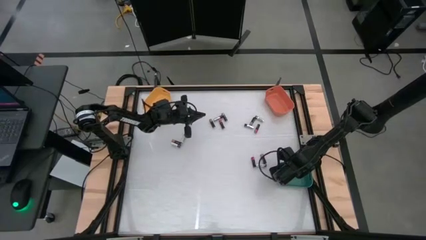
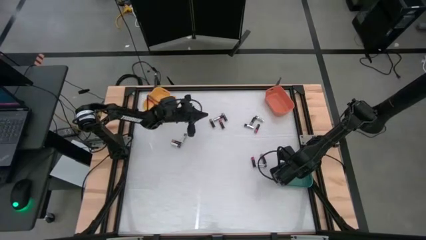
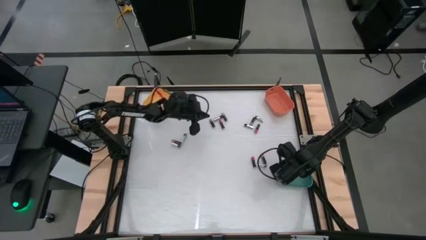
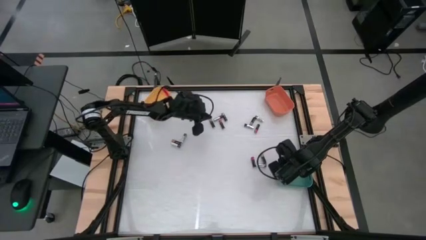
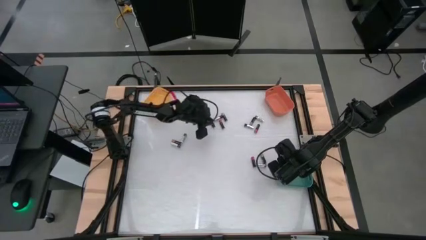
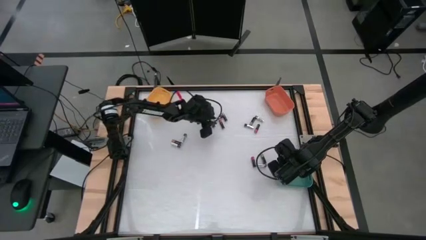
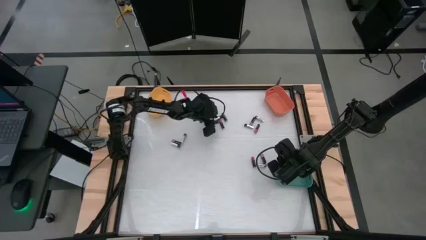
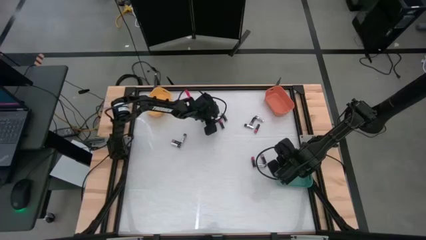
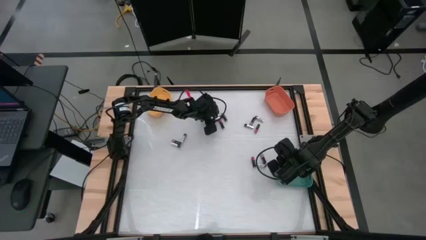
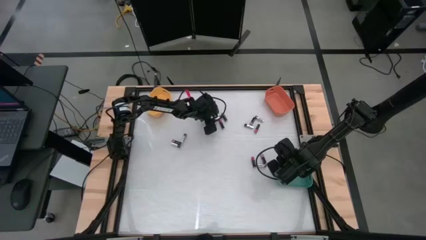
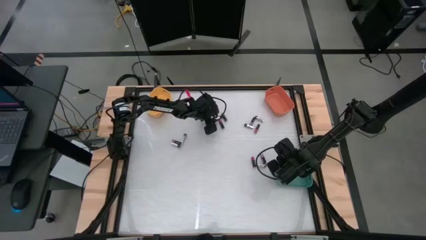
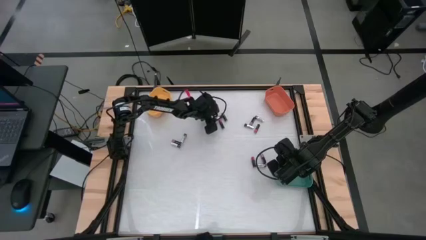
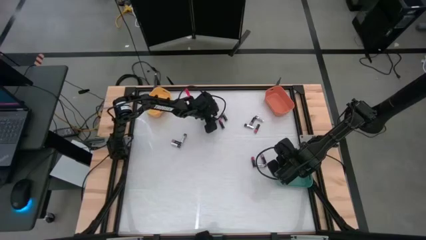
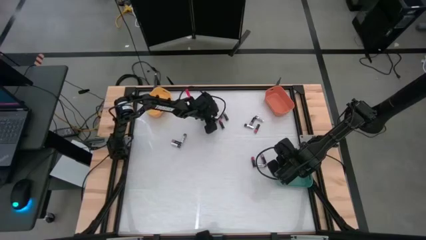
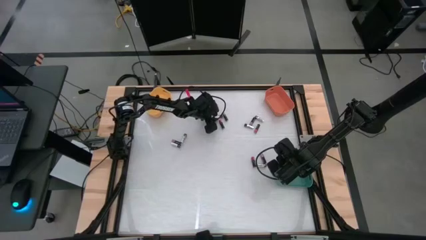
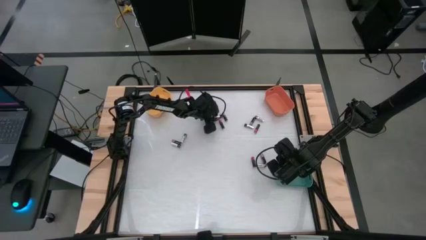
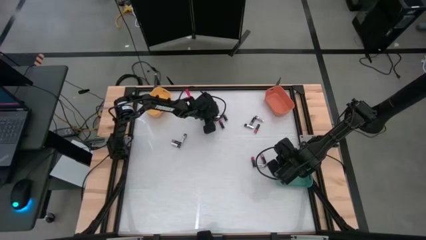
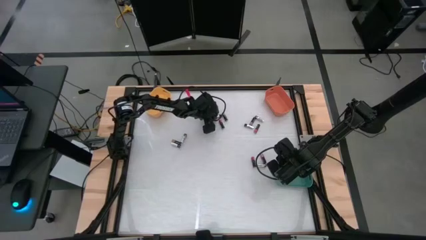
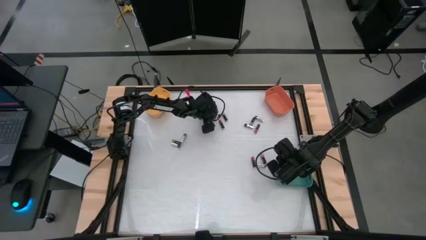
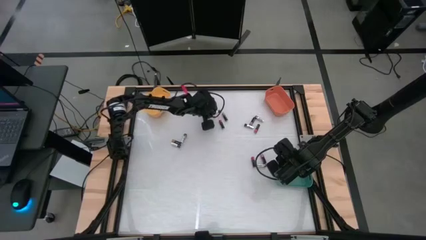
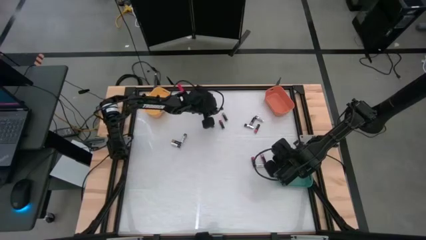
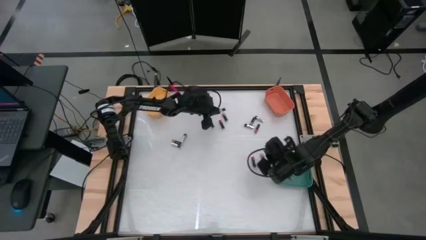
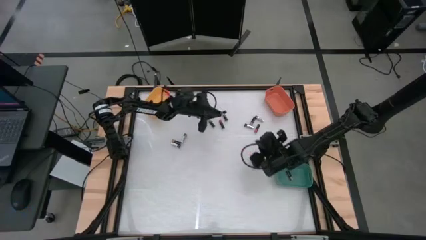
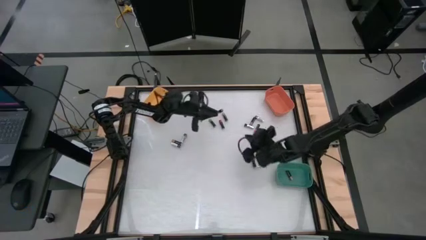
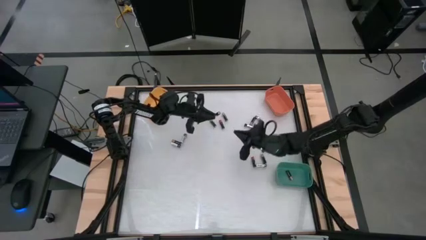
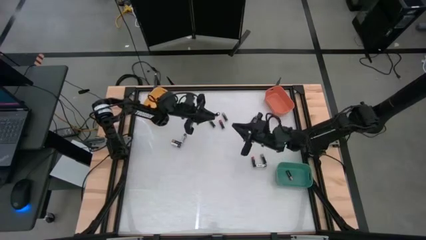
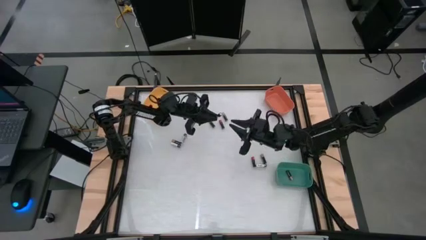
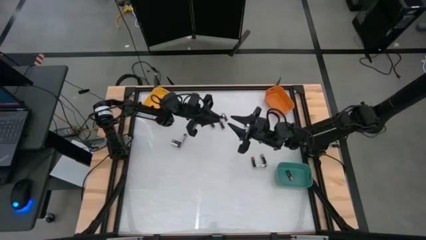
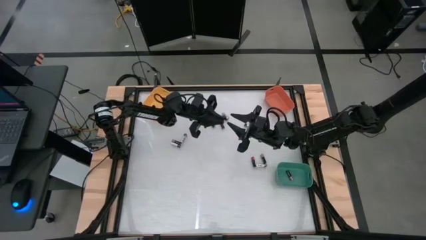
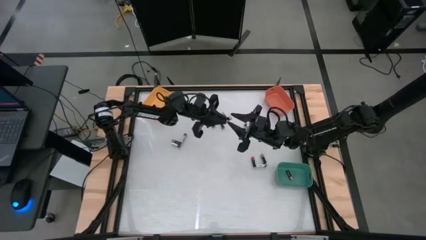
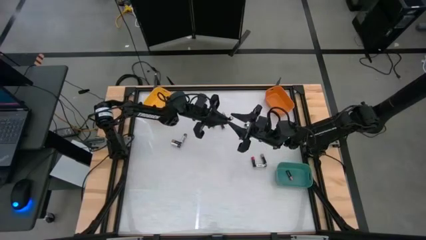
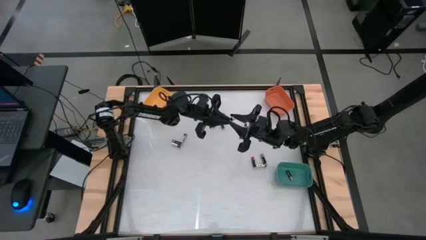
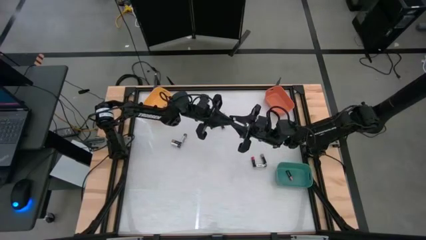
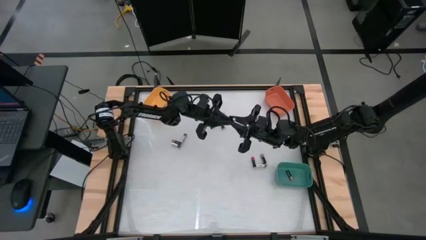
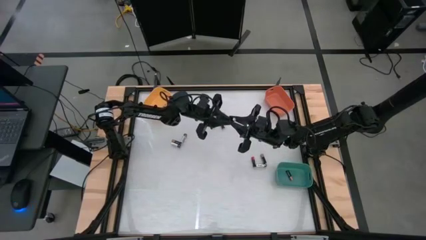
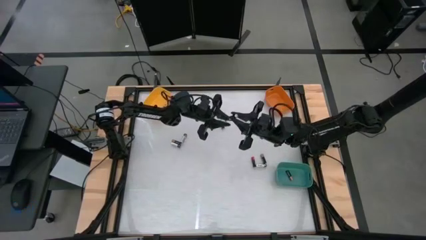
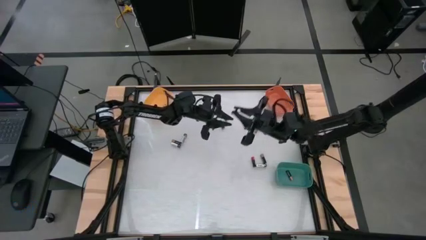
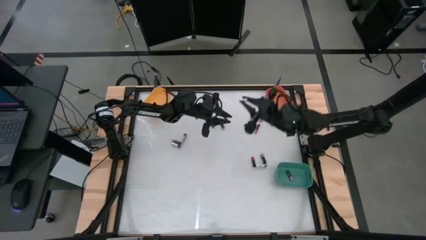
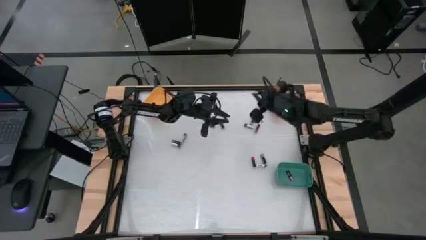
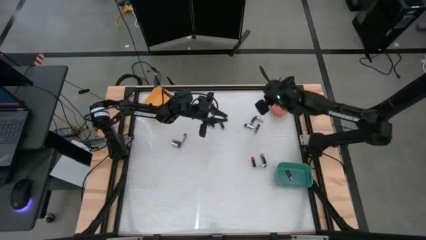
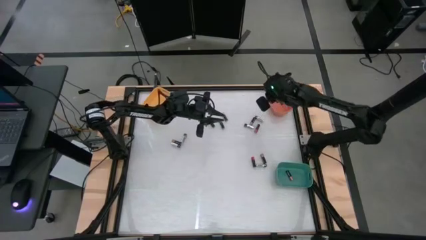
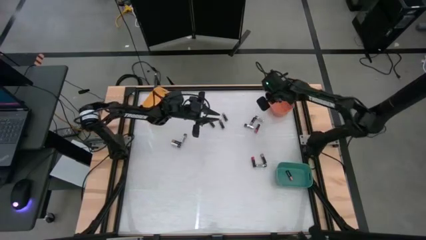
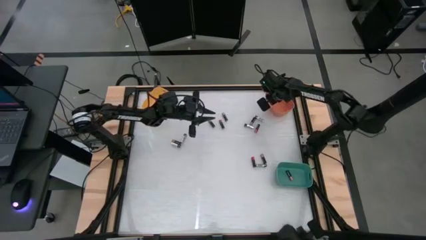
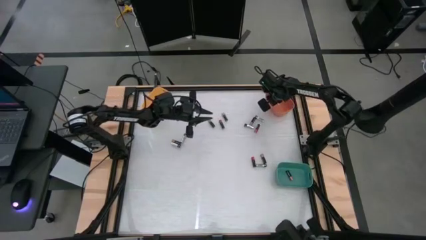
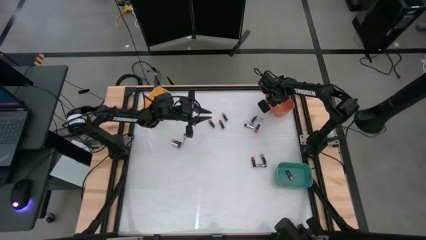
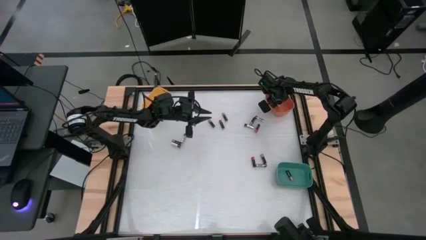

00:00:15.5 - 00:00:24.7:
Task: Sort batteries
Put the silver battery into the orange bin

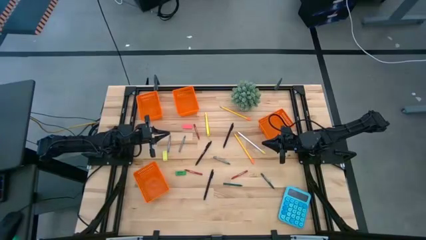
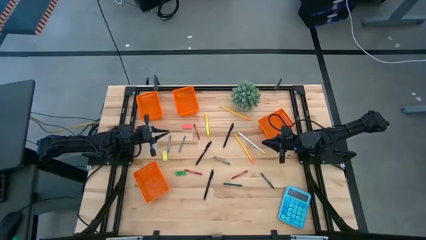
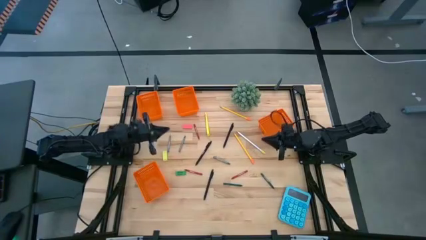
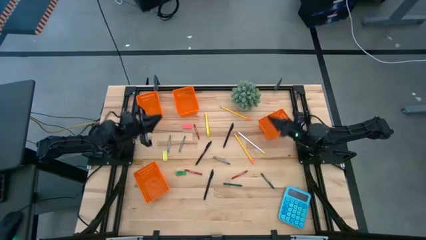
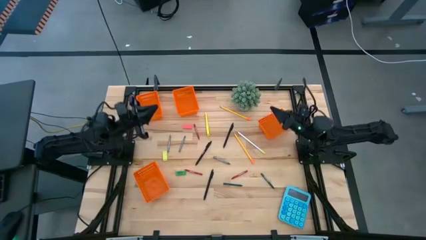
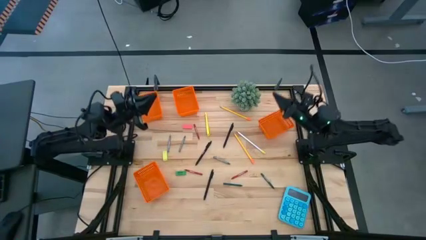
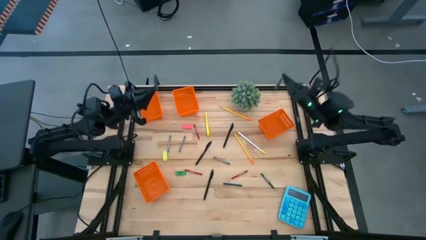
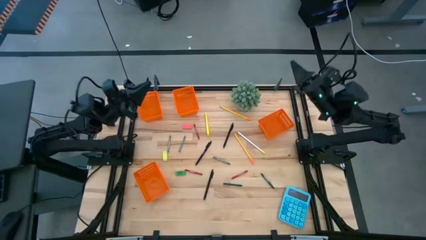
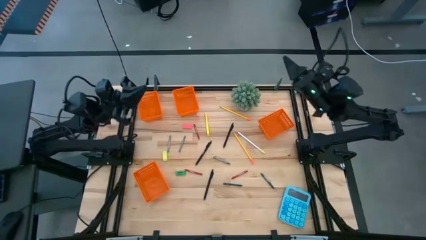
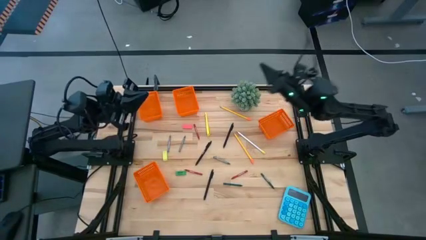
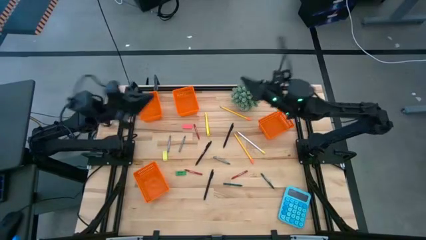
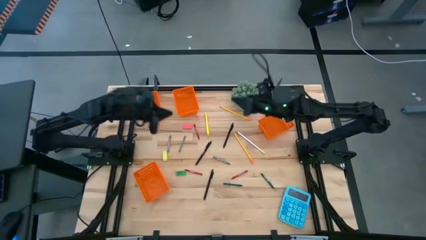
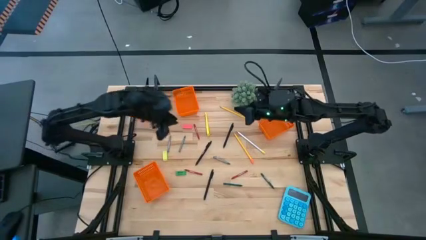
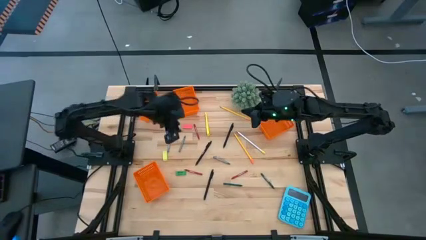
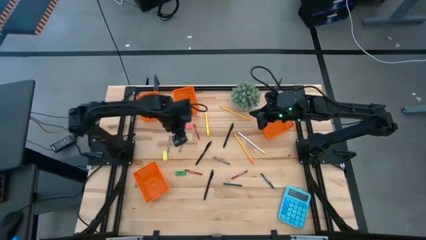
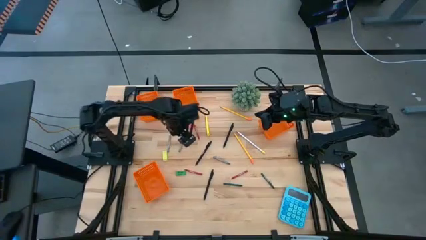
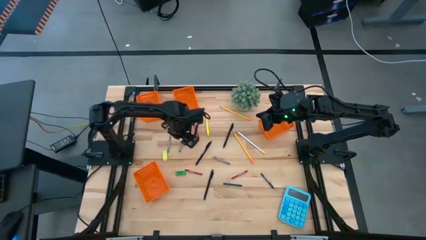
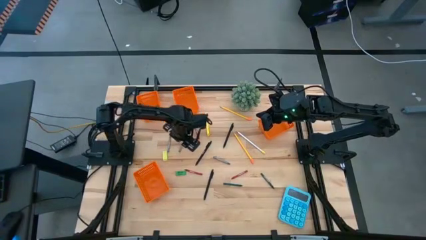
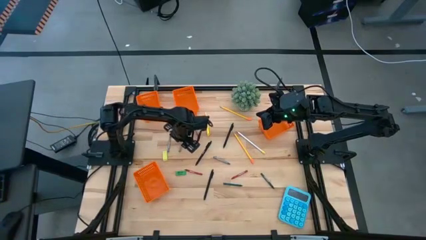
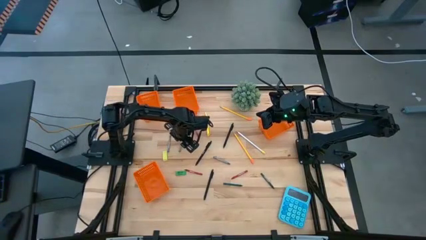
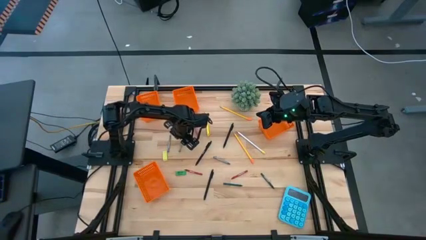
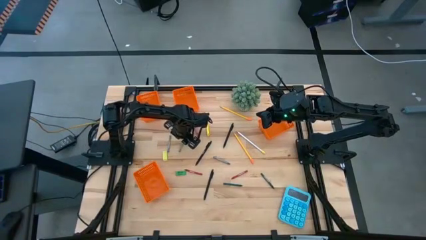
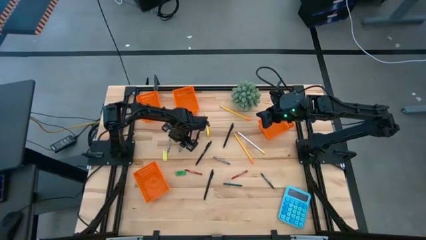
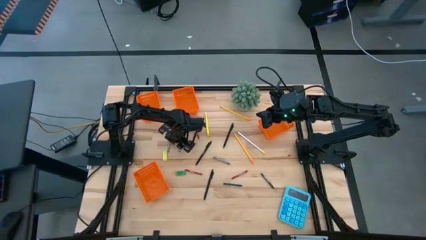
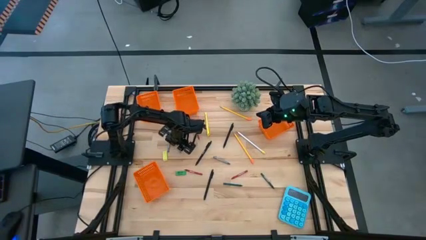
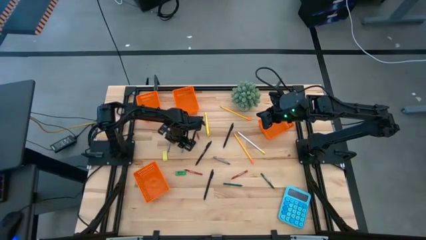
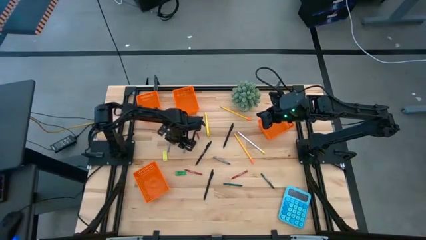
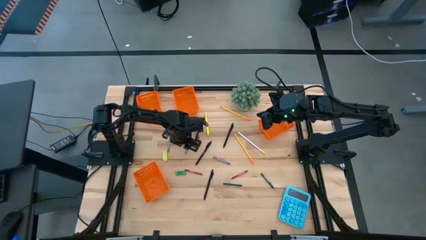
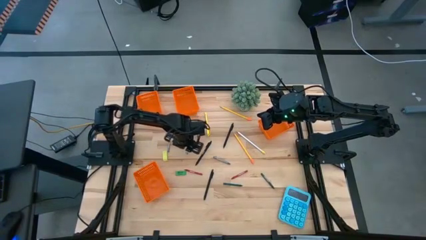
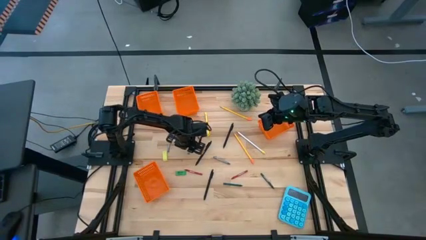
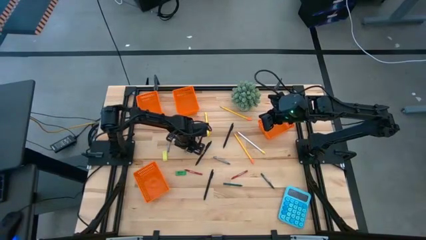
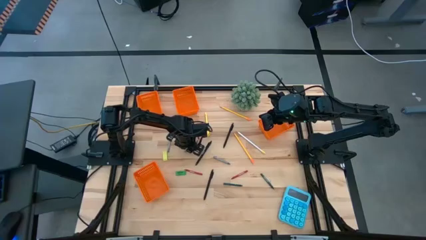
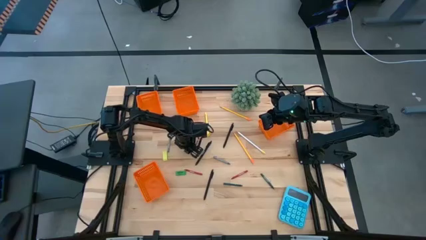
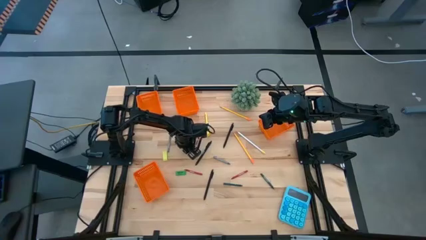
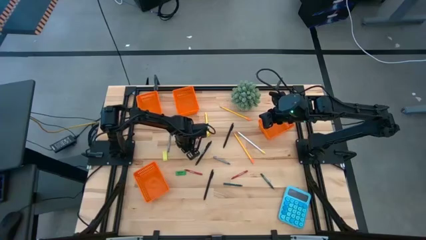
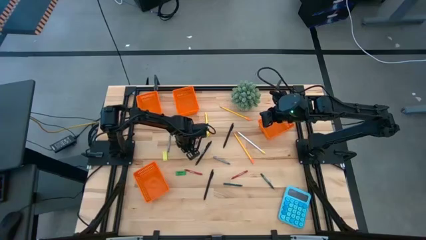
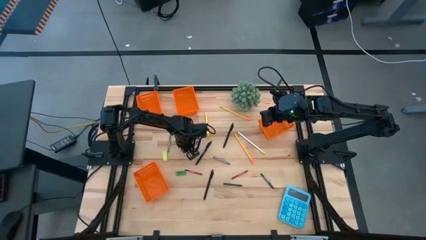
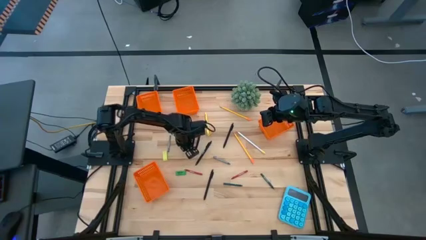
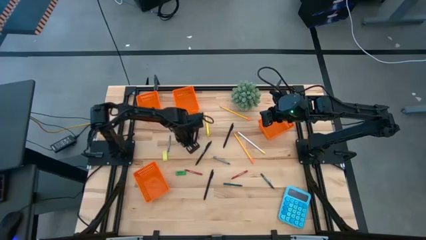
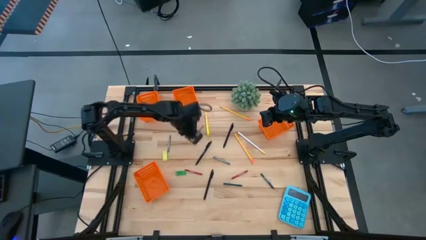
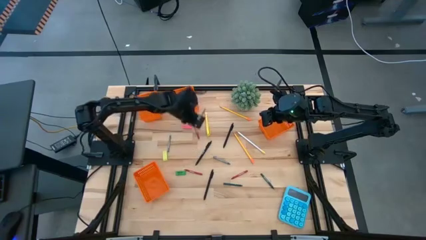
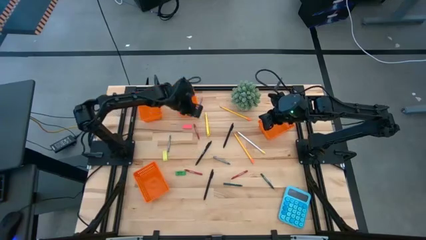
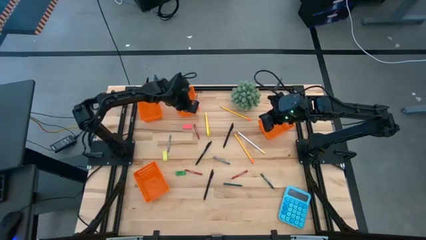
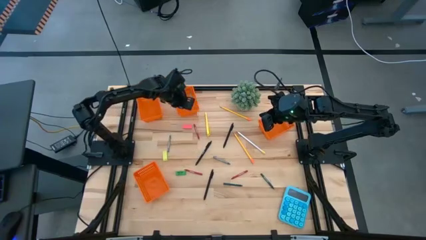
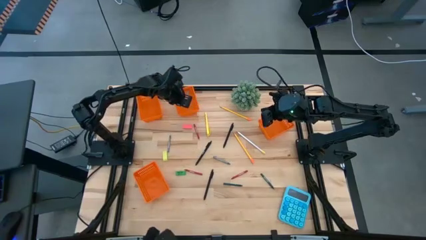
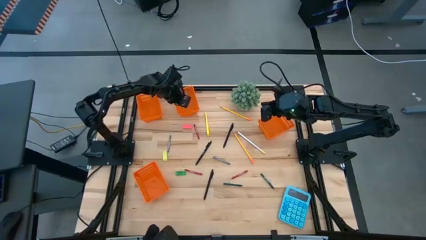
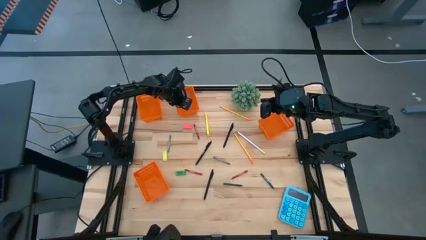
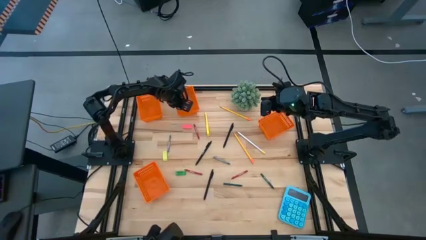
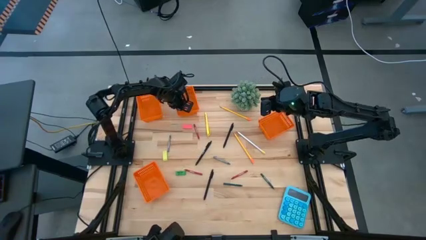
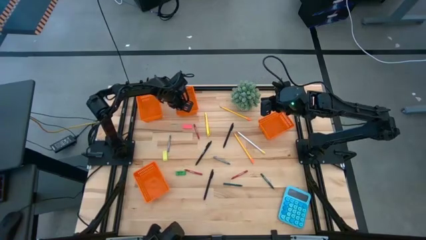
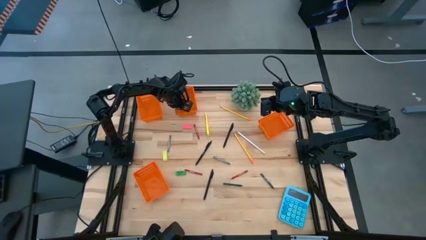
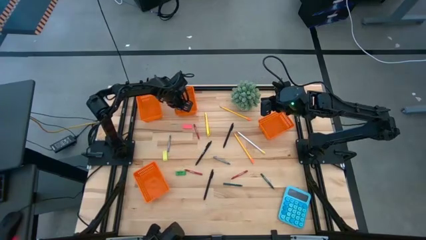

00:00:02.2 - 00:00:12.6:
Task: Sort crayons/erasers/pens/pencils in bins
Put the middle gray crayon into the middle orange bin
